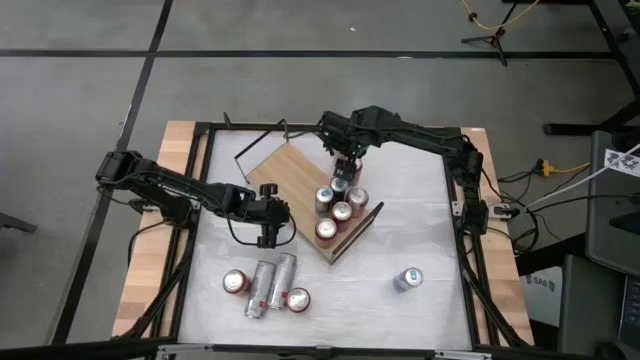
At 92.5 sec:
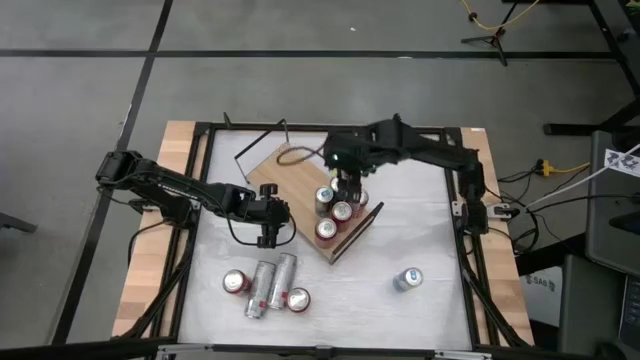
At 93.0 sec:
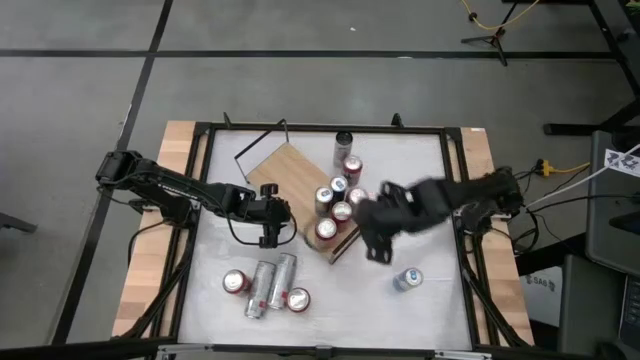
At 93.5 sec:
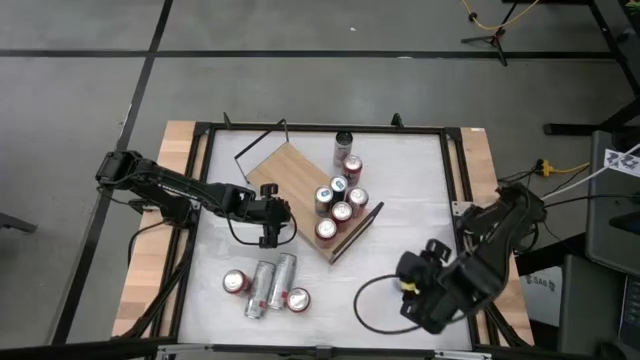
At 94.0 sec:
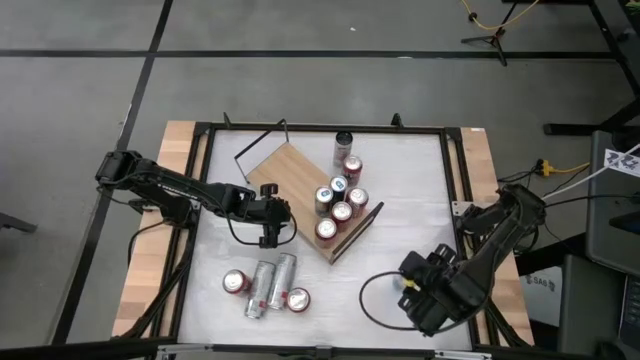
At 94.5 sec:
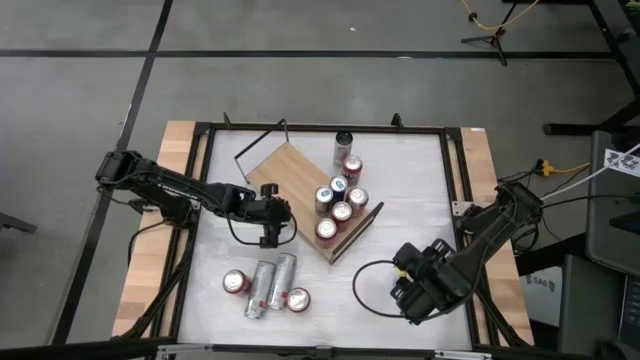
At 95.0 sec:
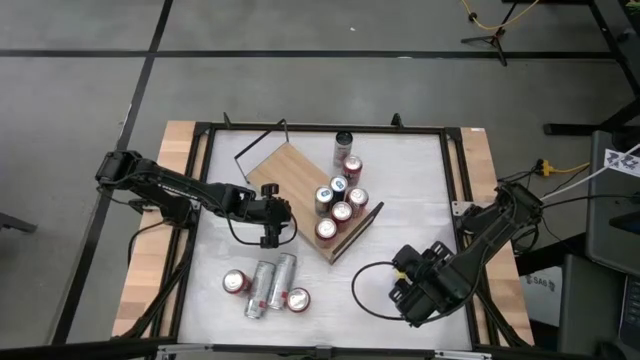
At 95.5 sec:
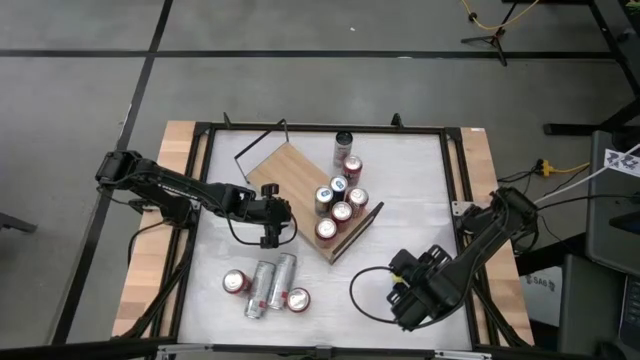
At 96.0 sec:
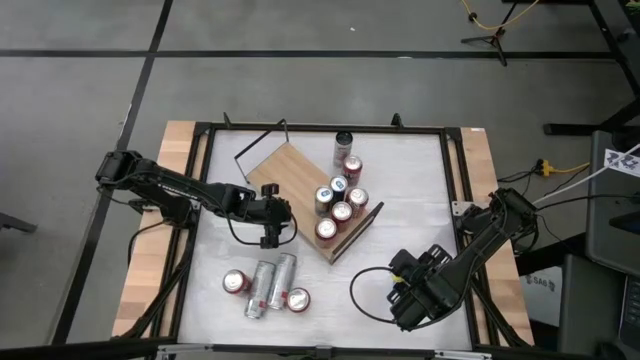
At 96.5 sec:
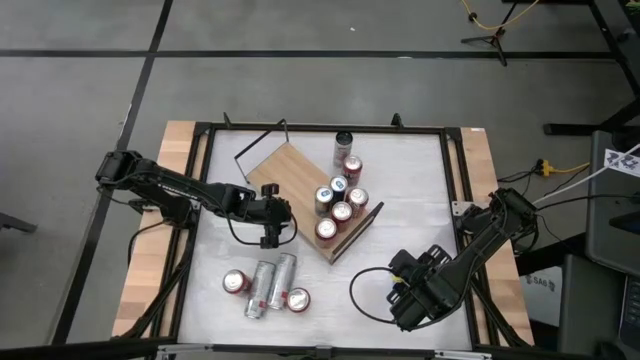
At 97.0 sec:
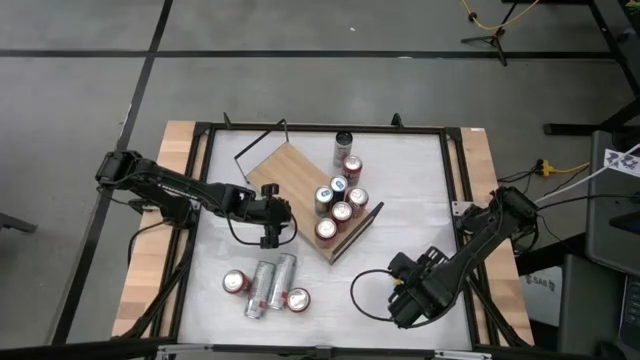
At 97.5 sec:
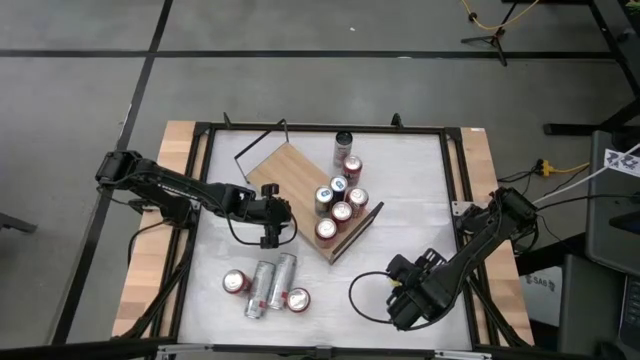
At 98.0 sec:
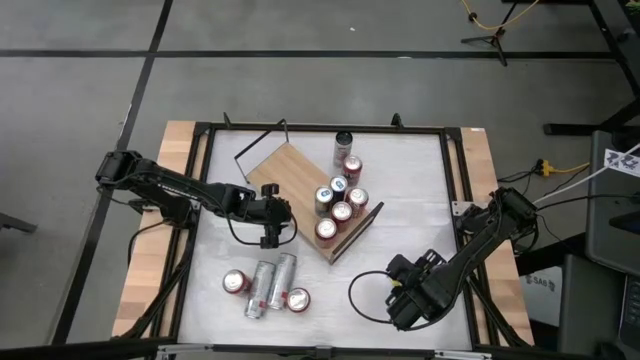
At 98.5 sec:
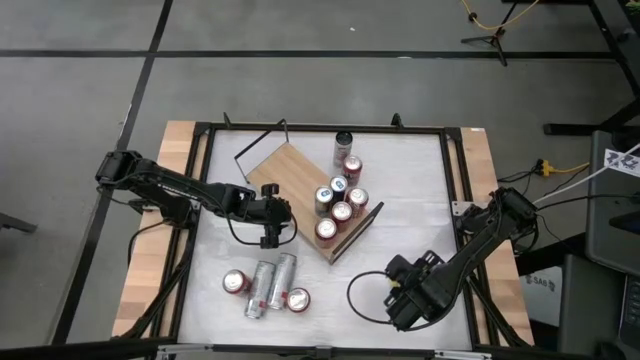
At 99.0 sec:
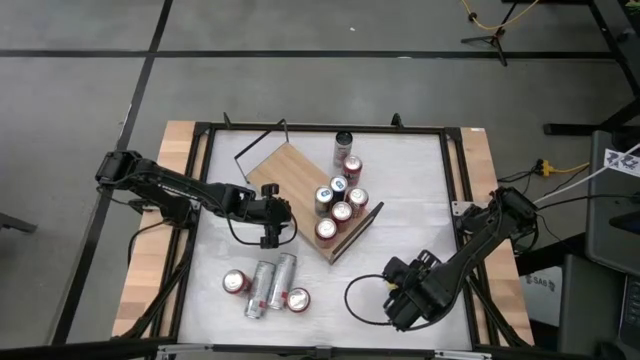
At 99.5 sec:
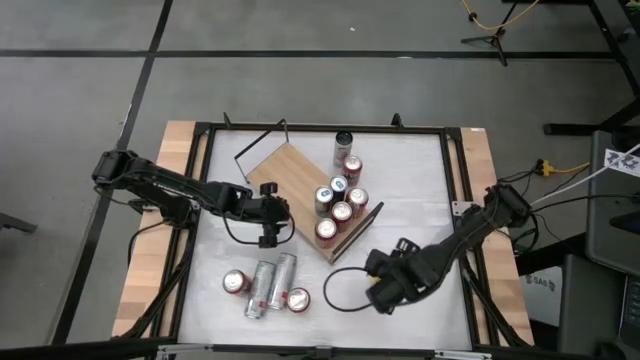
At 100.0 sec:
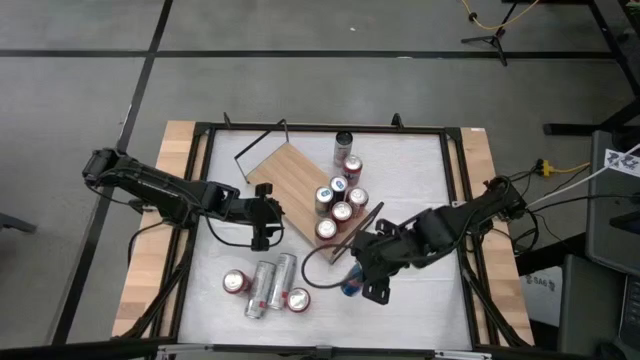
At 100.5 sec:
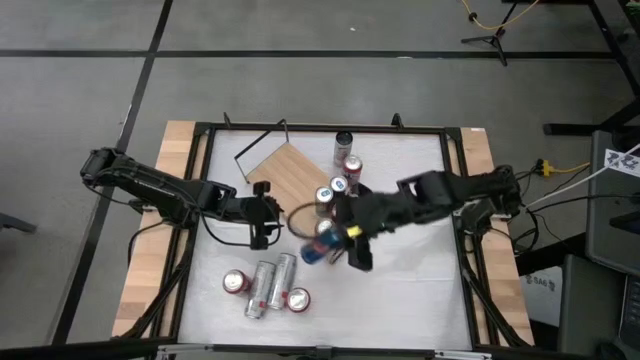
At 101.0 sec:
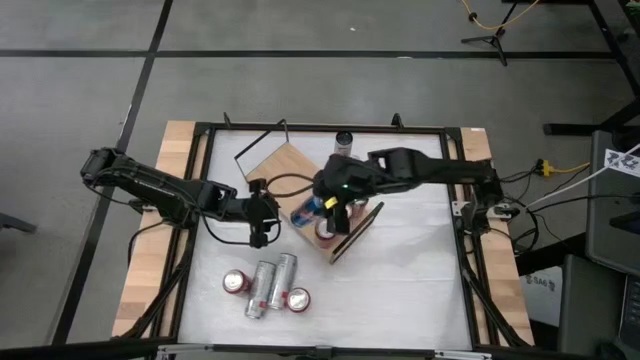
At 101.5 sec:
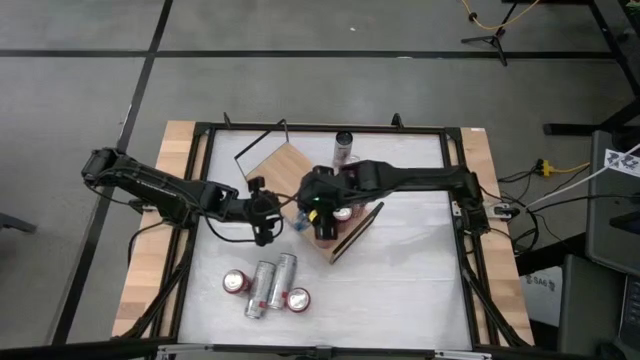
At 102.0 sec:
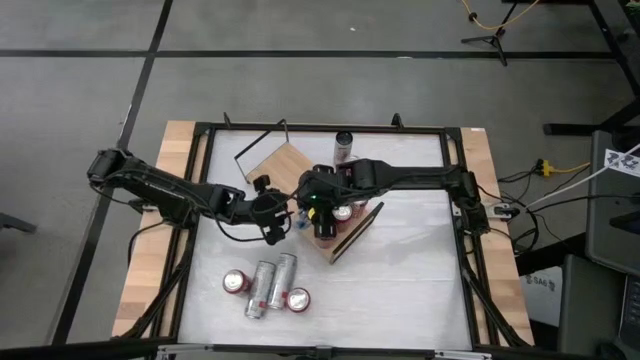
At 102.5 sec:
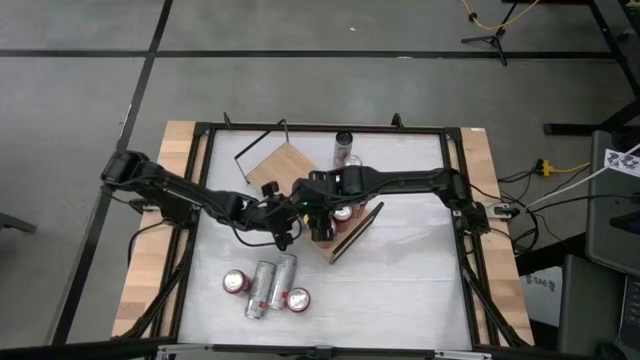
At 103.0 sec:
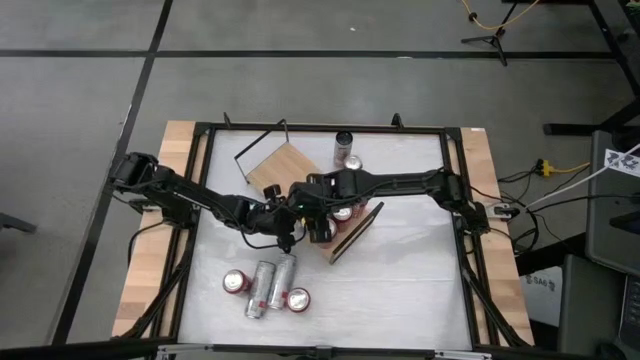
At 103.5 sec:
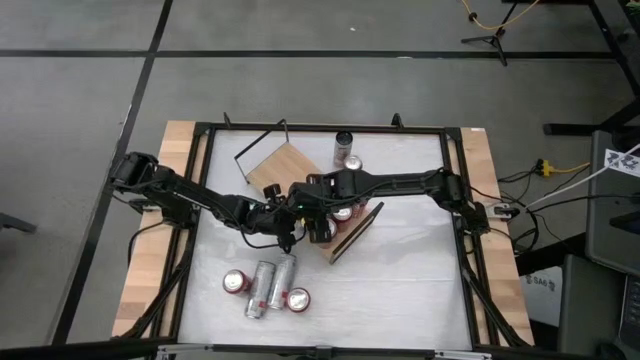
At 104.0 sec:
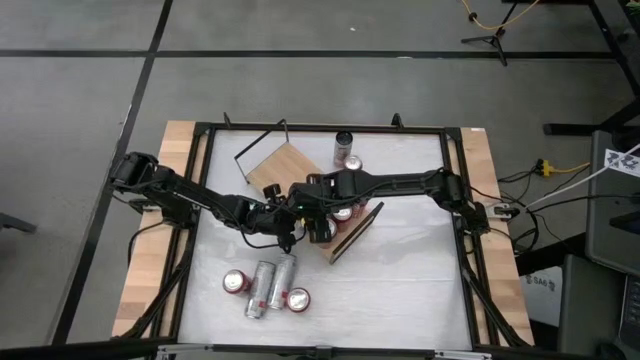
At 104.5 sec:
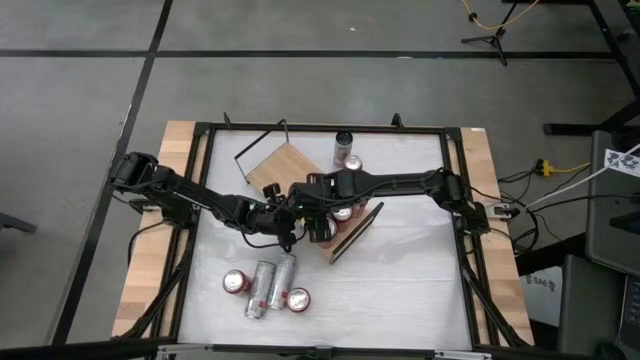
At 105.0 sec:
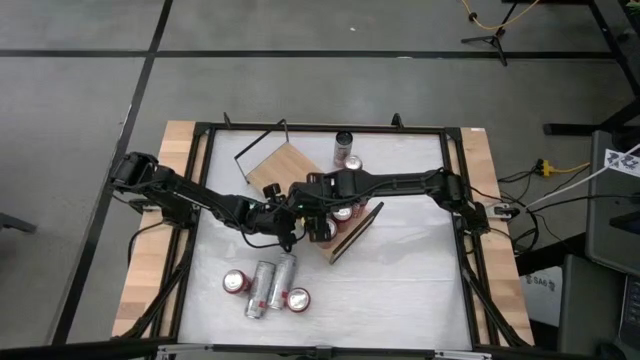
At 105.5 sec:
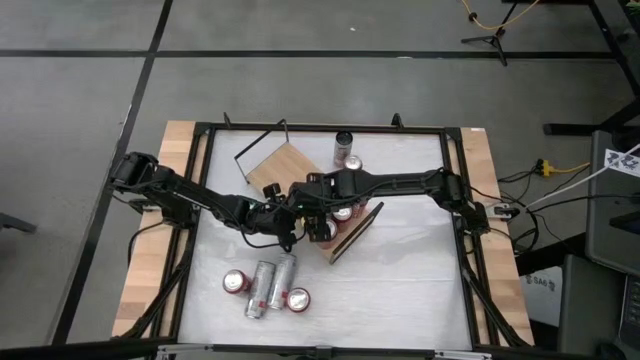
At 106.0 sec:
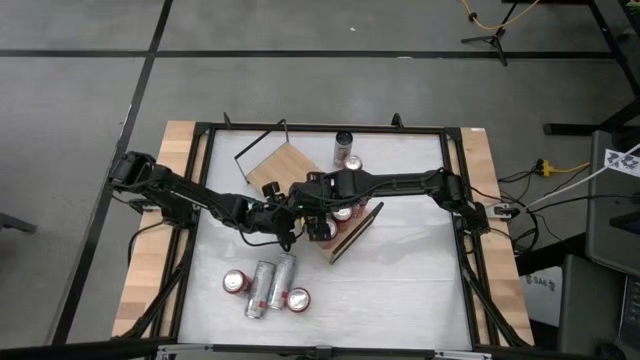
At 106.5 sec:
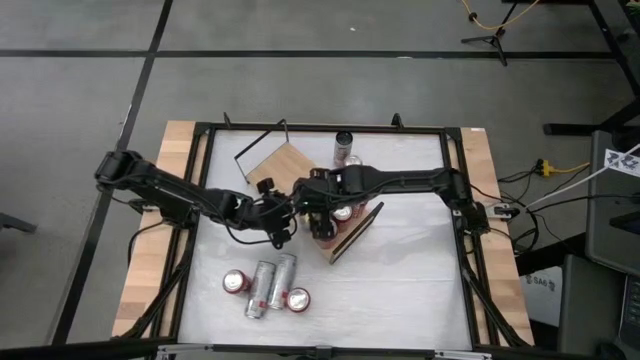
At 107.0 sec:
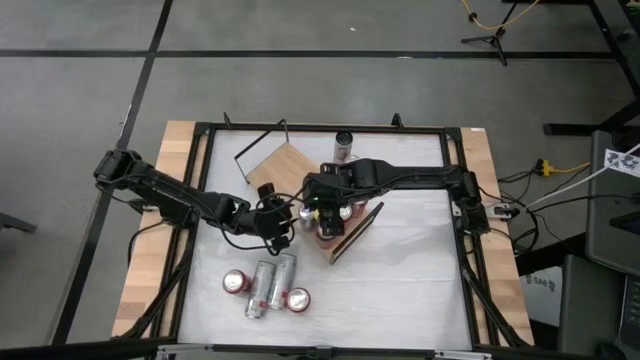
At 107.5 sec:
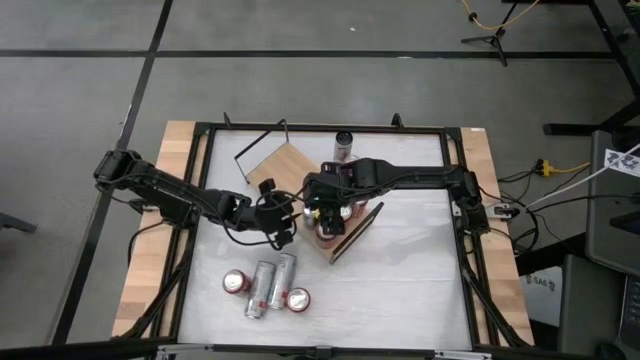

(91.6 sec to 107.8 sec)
Task: Place canned beverage on shelf
Put the blue soda can on the shelf aligned with the other blue soda cans

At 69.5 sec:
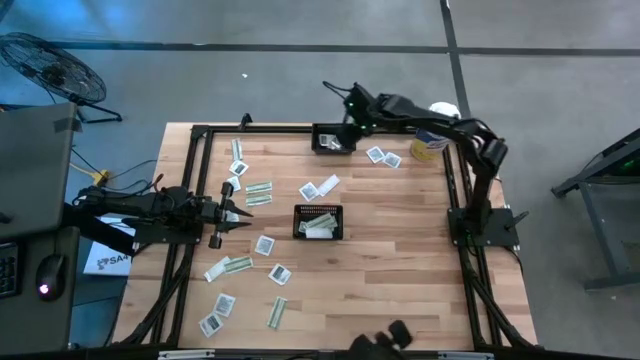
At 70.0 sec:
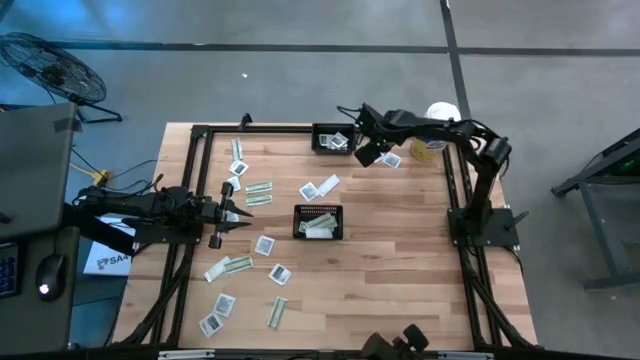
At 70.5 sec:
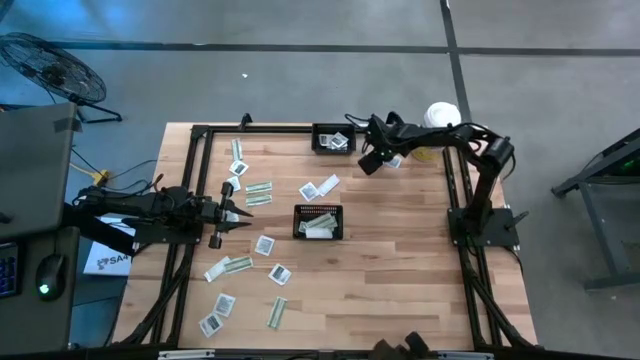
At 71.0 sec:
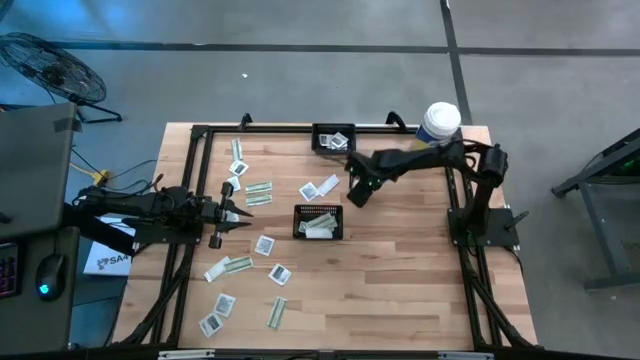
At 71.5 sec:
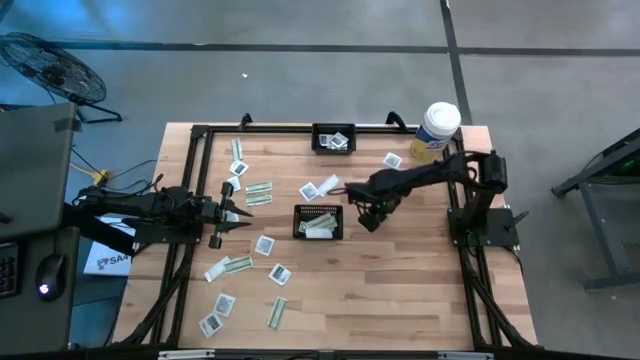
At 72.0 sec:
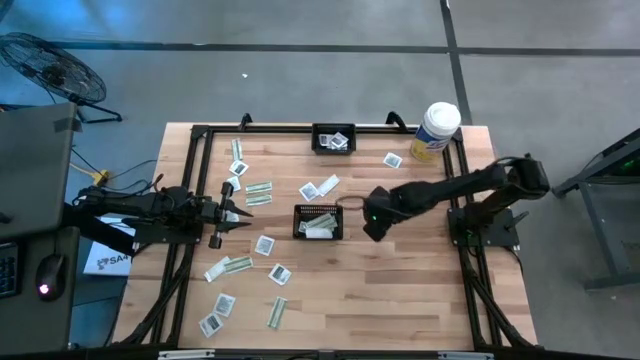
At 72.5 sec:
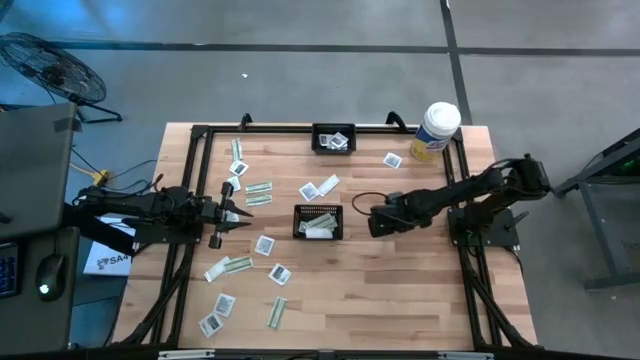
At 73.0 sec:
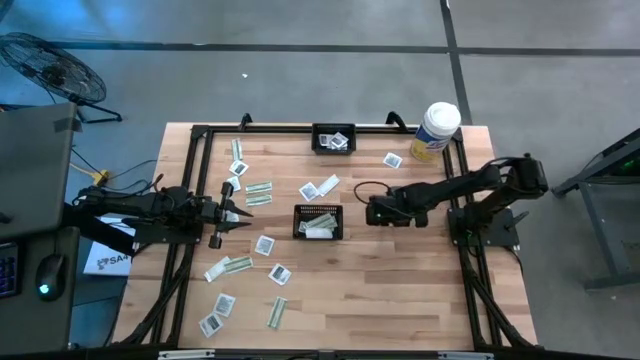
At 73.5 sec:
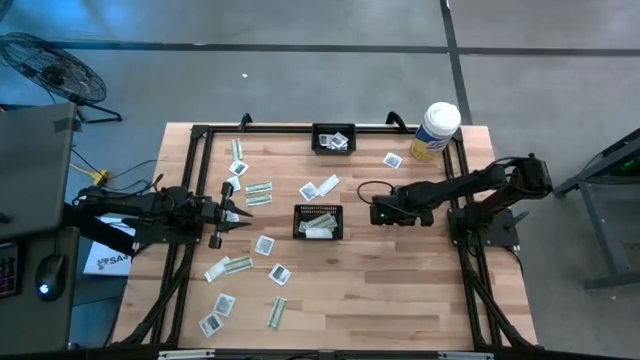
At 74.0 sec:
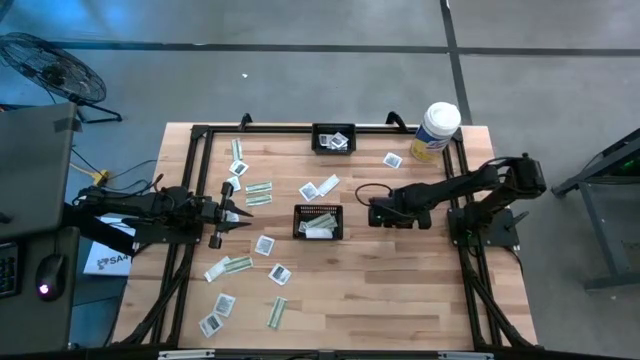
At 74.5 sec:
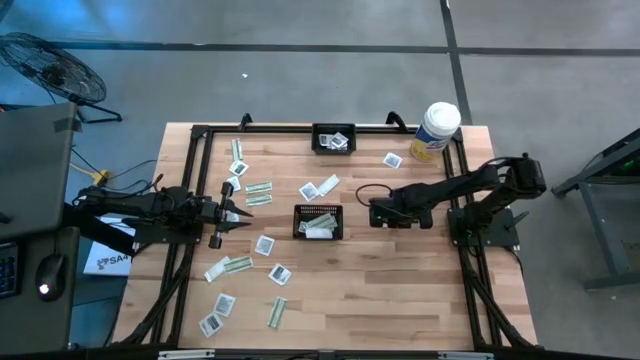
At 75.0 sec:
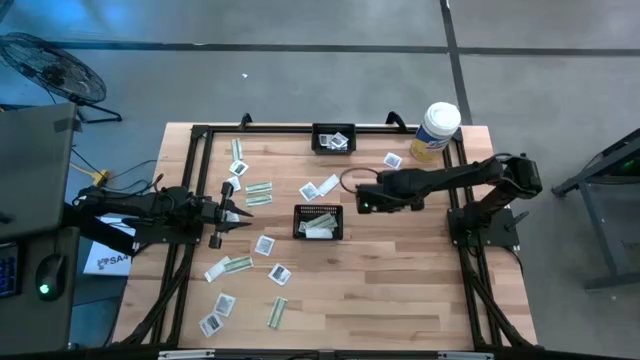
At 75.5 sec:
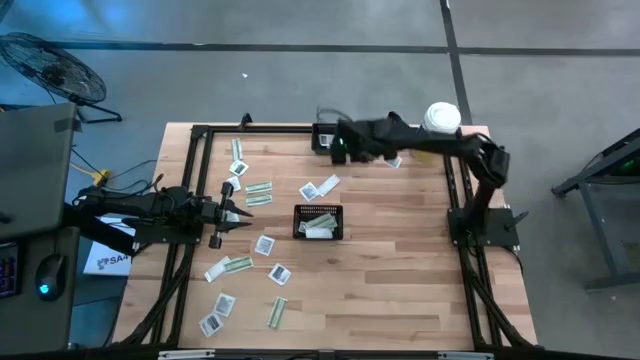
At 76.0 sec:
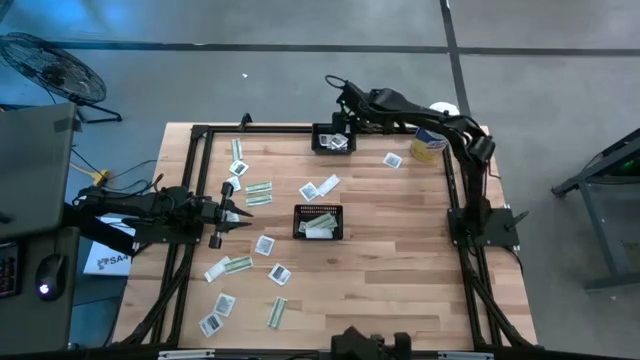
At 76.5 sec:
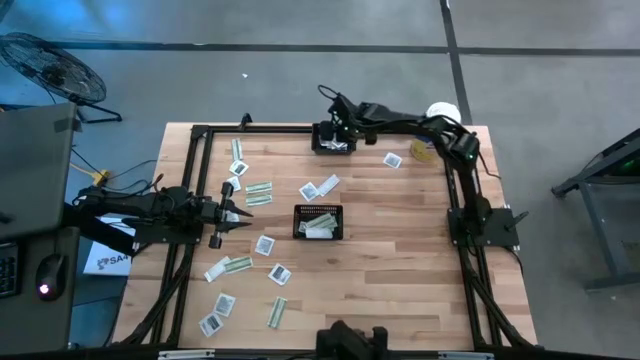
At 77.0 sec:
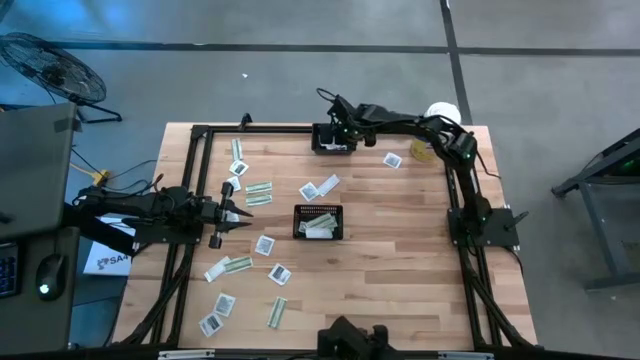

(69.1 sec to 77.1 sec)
Task: Pick & Place First Aid Supplies
Put the towelette pack into the top black basket
